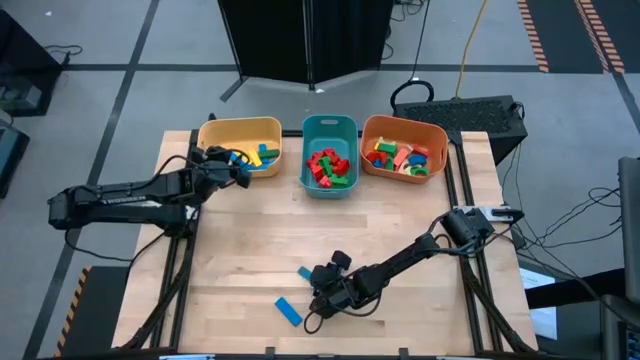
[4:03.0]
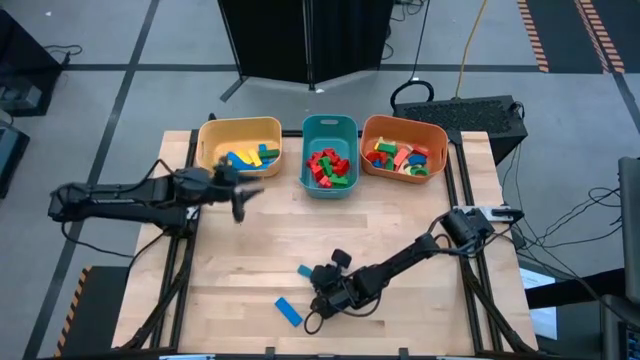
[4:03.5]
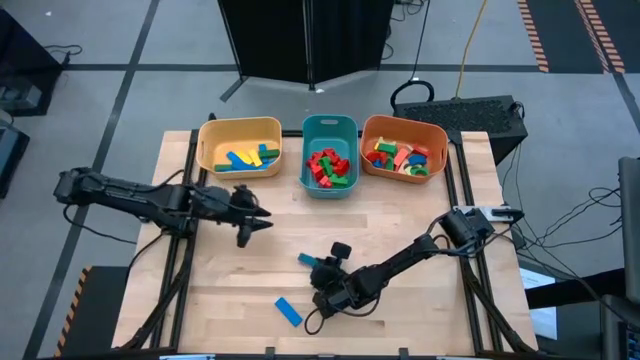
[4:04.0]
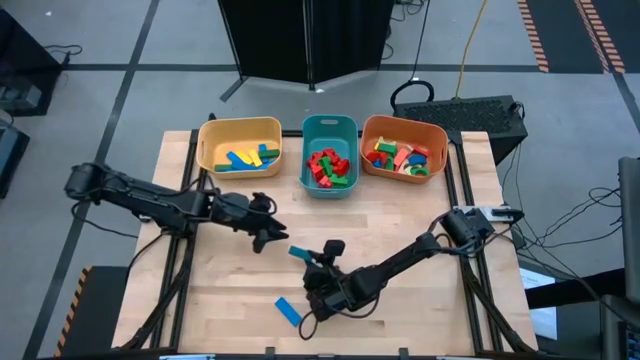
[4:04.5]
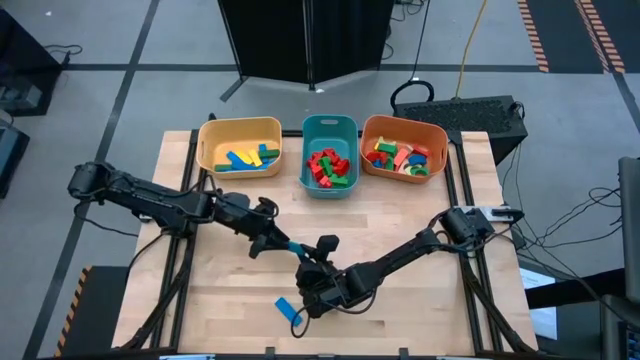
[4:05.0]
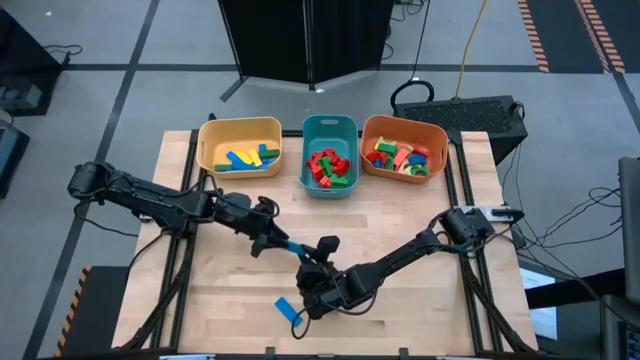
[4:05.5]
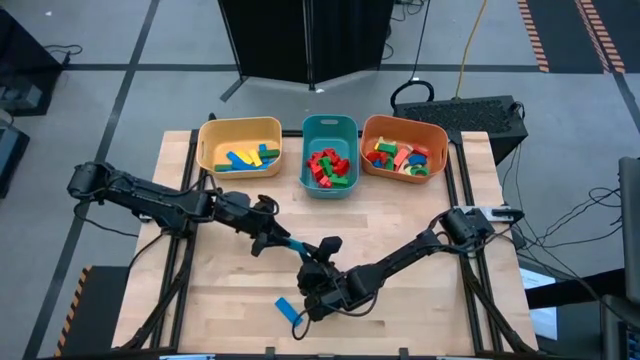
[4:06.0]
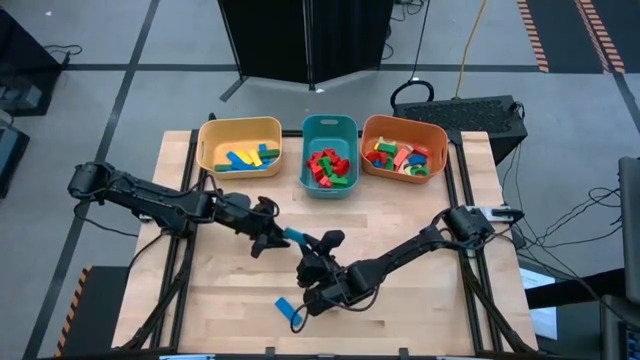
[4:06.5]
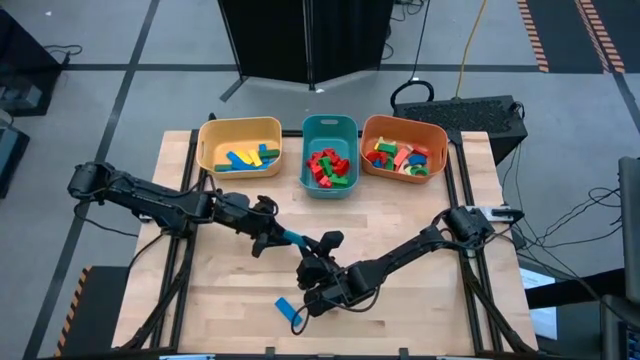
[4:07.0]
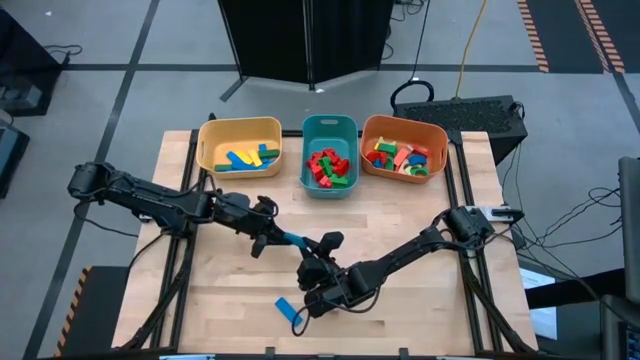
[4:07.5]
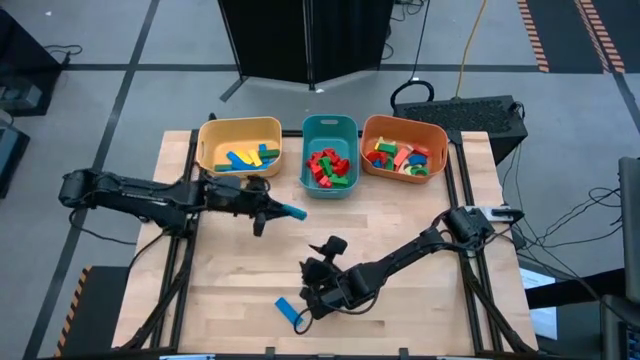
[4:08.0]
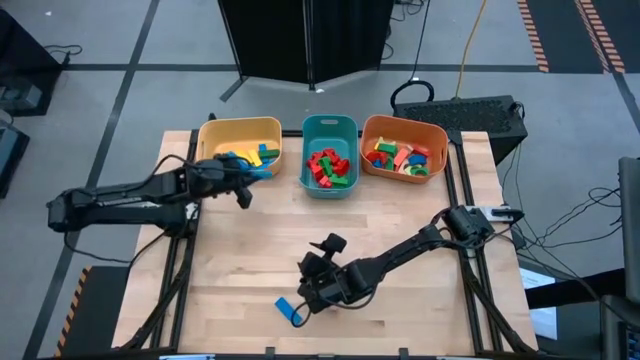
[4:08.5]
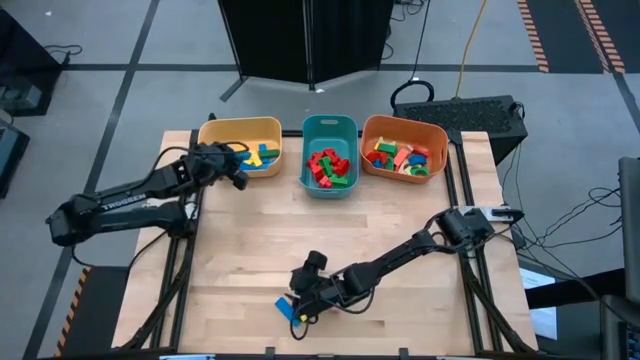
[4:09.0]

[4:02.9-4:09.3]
Task: Sort blocks by size
Put the blue rectangle block into the yellow bin

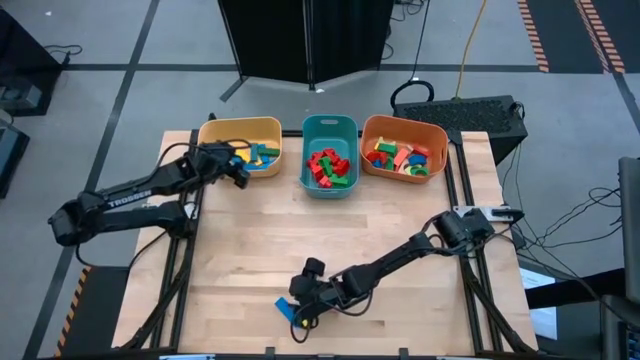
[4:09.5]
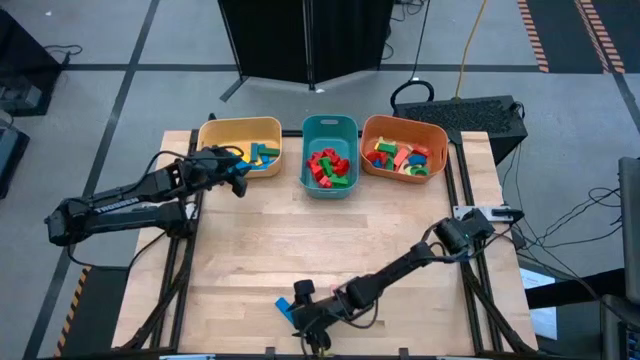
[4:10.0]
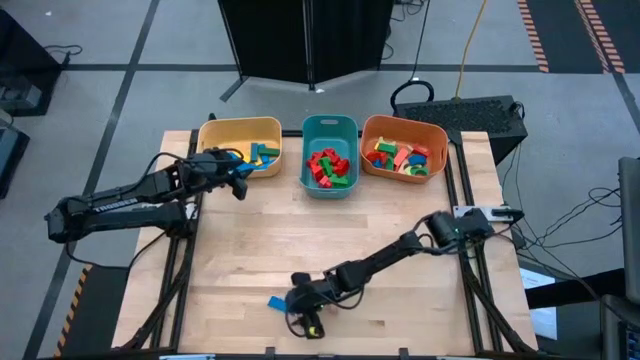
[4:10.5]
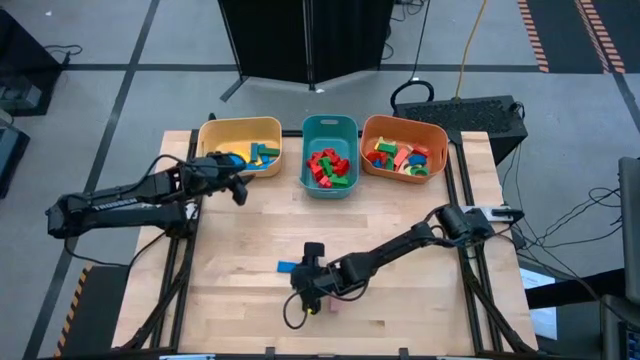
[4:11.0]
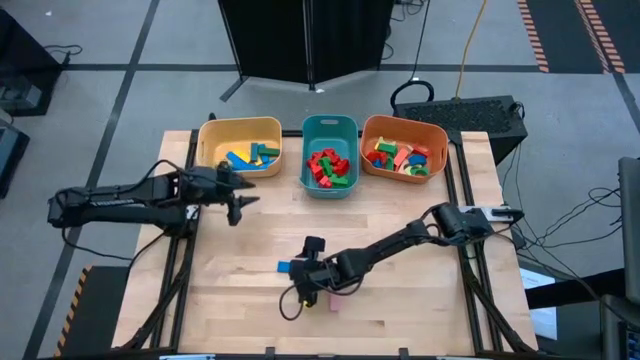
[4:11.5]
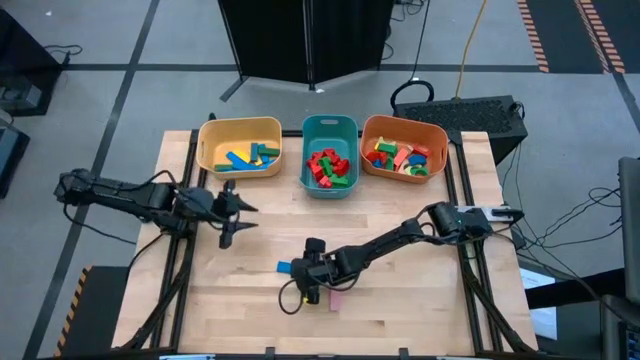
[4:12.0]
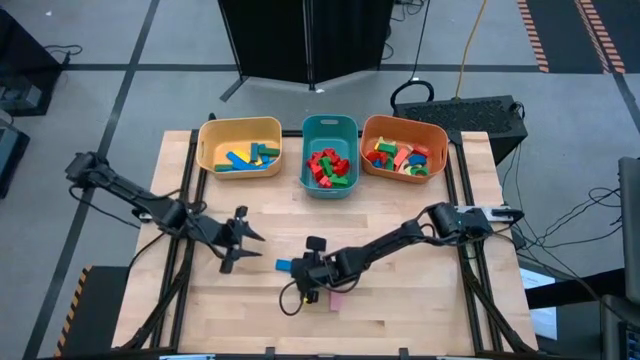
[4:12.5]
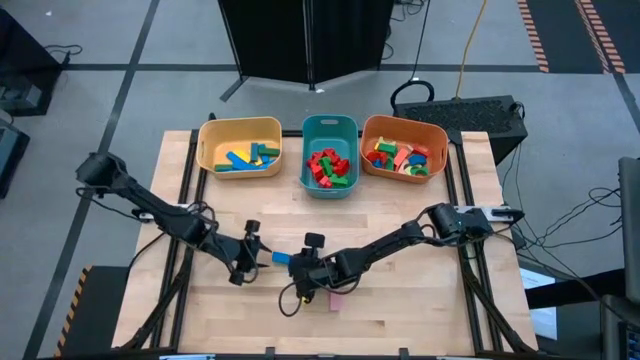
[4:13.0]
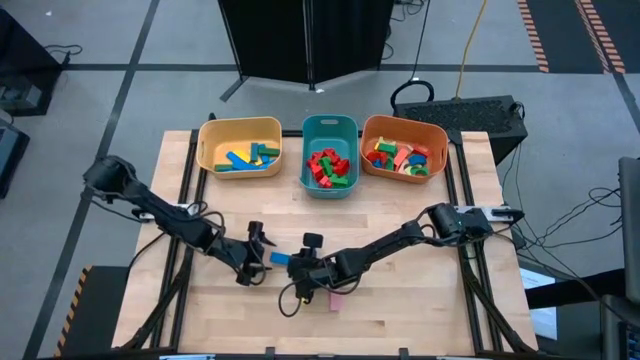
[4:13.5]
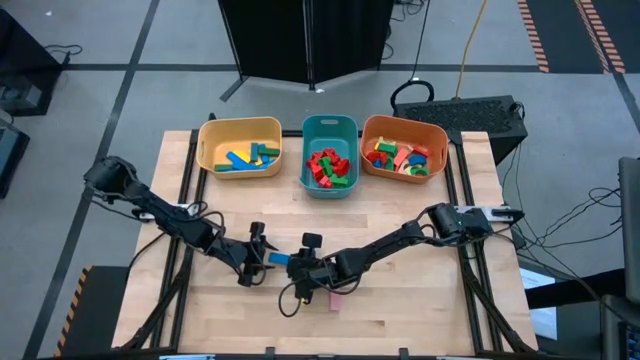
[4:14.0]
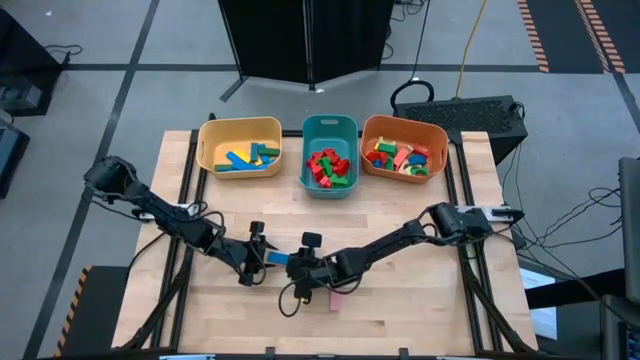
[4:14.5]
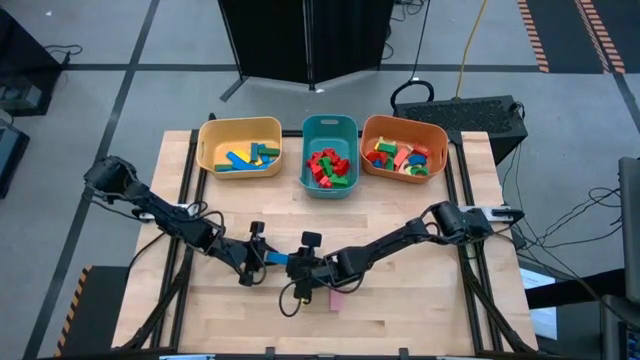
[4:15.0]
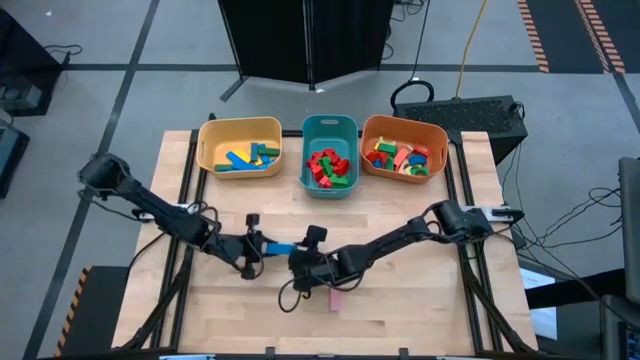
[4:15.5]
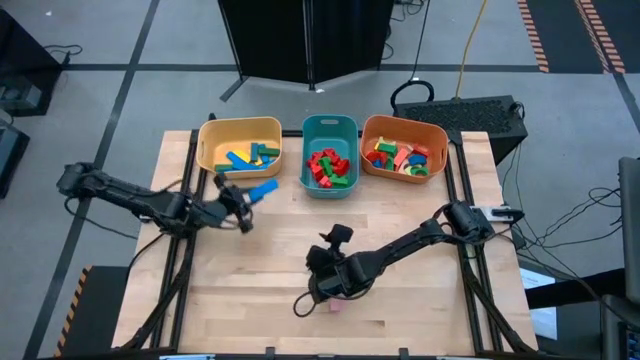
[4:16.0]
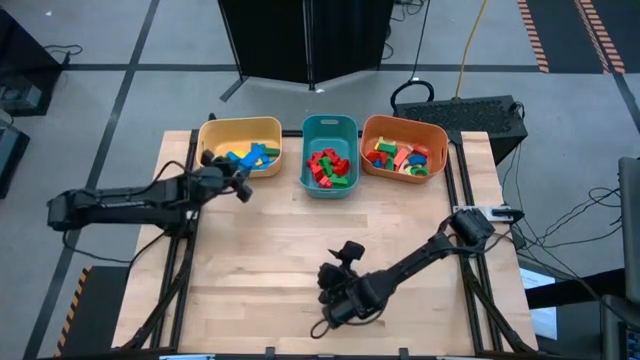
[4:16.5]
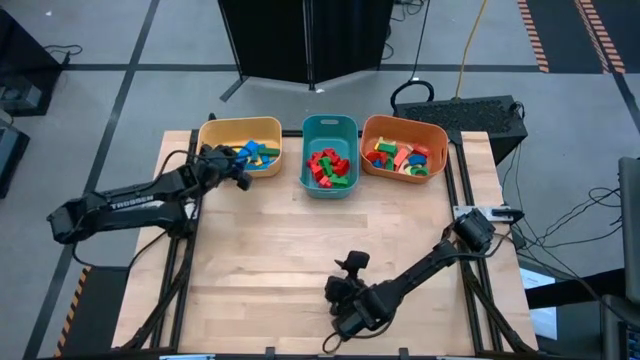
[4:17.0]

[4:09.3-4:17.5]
Put the blue rectangle block into the yellow bin

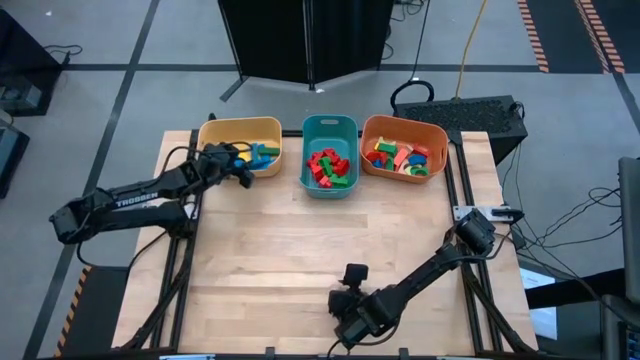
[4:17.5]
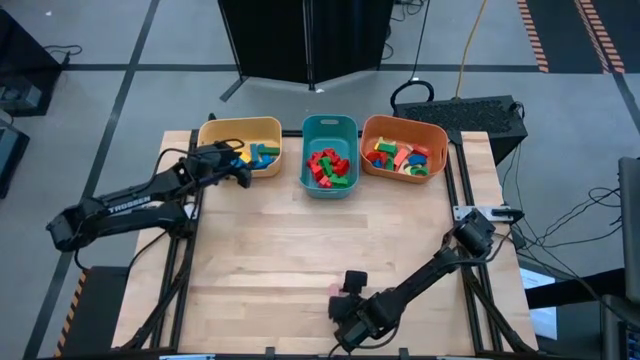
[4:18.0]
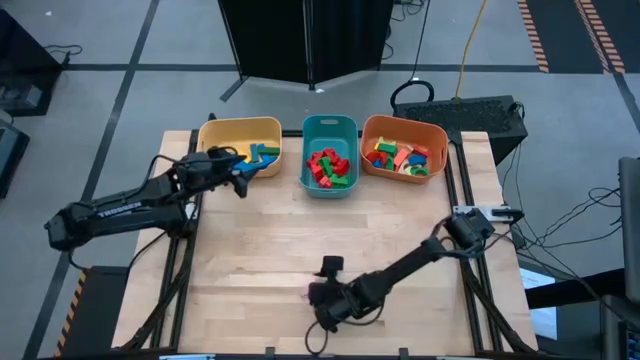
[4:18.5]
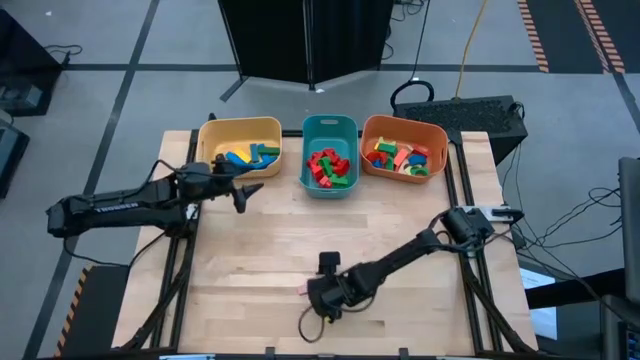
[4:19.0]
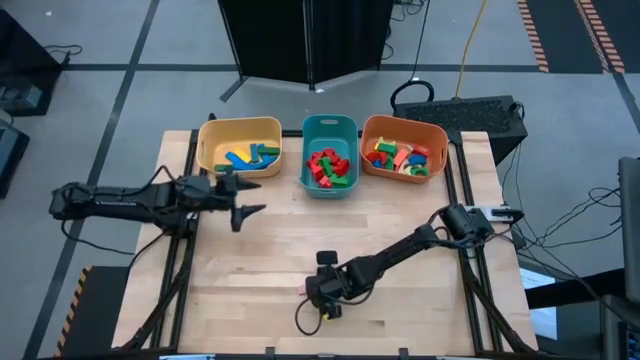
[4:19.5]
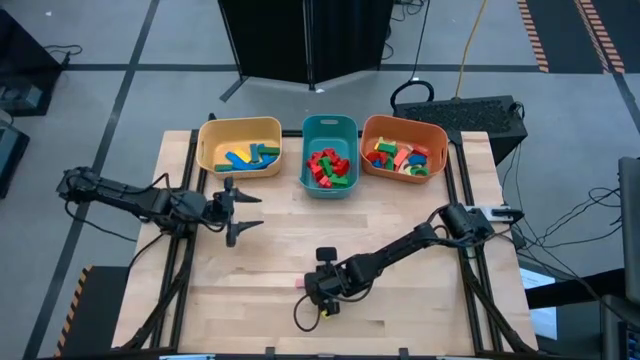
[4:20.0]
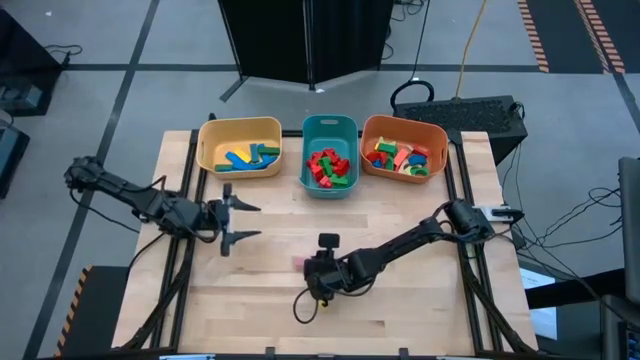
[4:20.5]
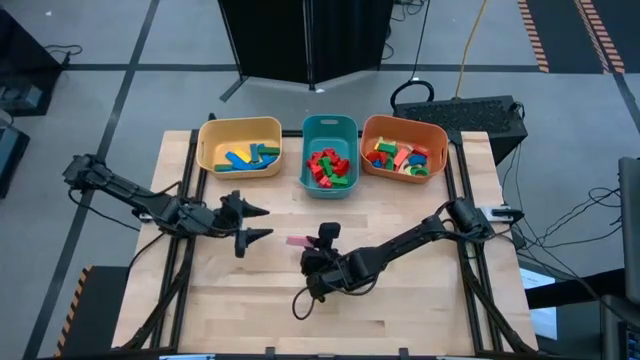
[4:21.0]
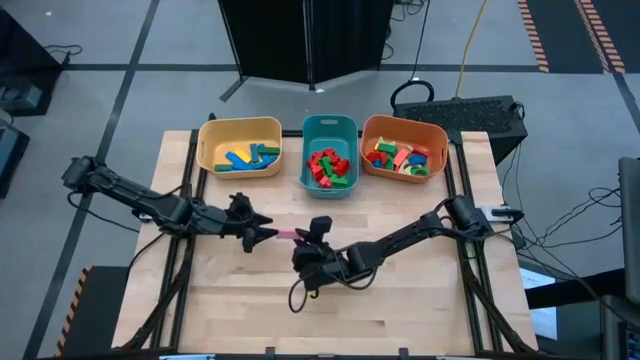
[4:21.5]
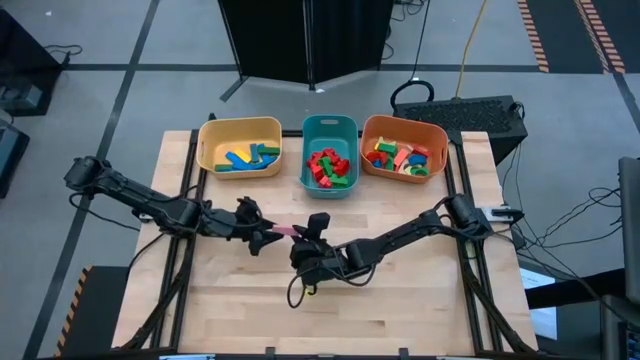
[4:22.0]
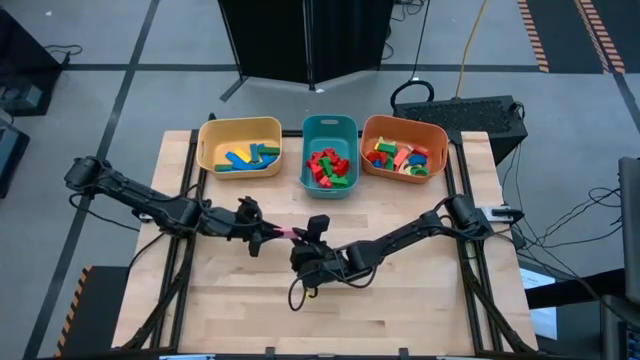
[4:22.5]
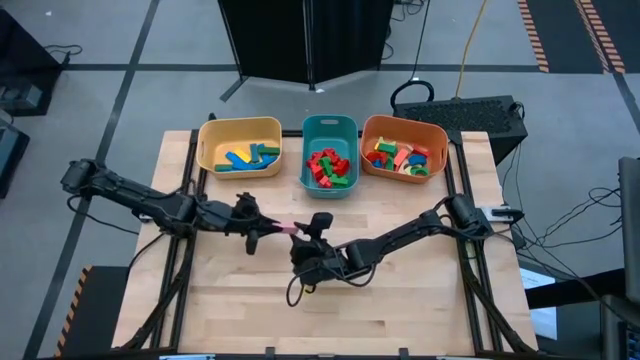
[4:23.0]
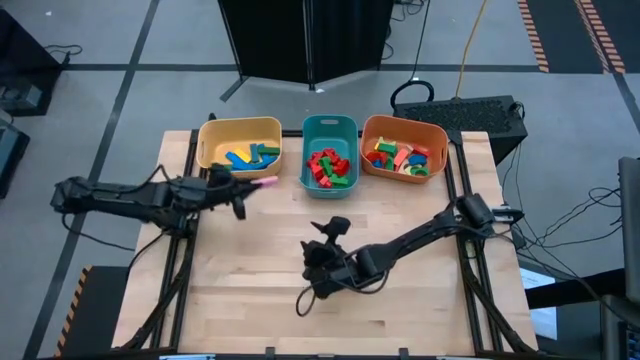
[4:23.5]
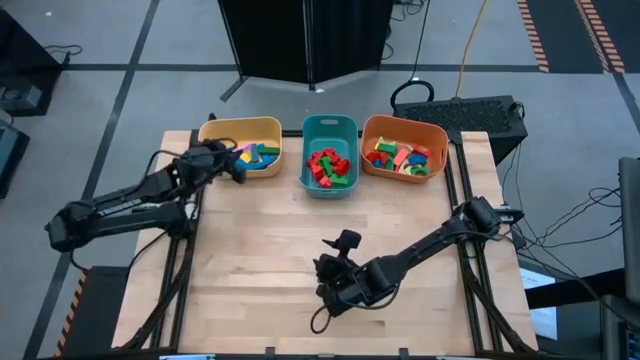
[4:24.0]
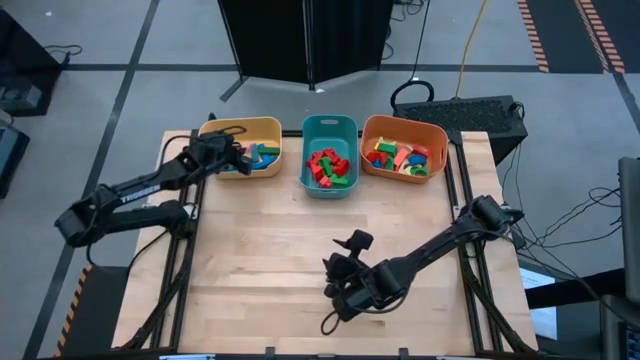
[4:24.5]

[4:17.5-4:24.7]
Put the pink rectangle block into the yellow bin
